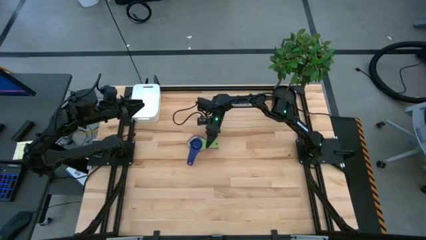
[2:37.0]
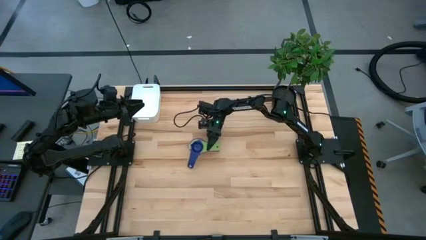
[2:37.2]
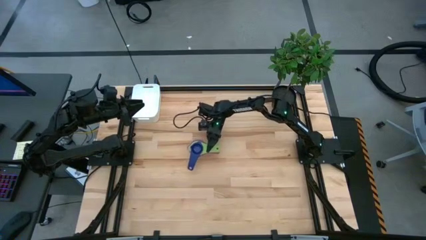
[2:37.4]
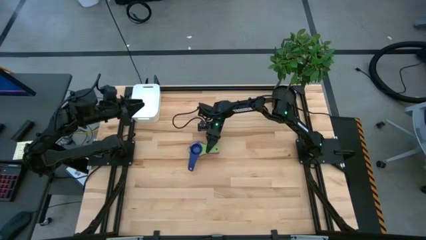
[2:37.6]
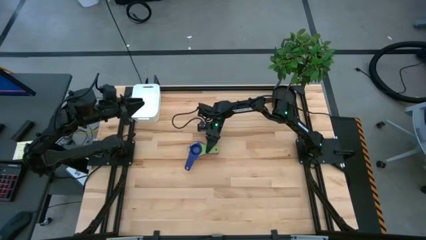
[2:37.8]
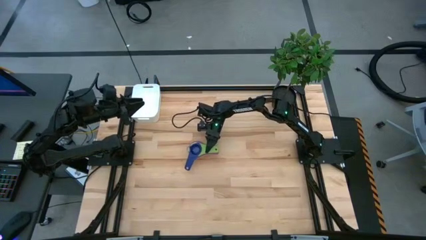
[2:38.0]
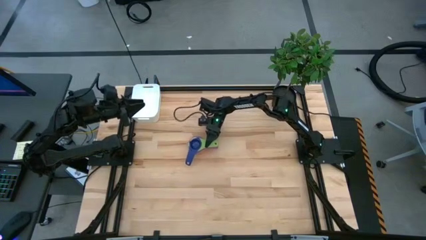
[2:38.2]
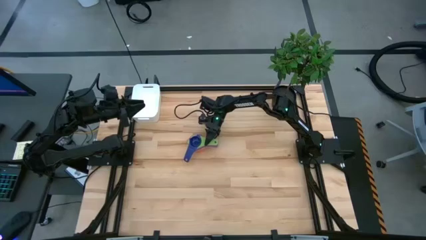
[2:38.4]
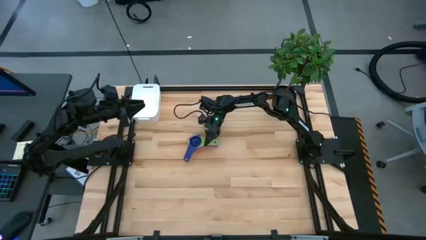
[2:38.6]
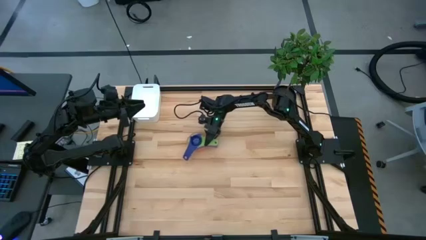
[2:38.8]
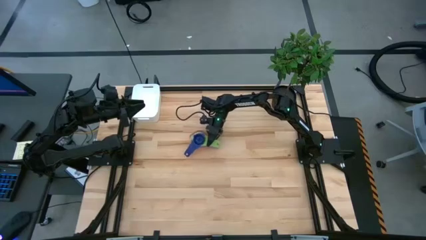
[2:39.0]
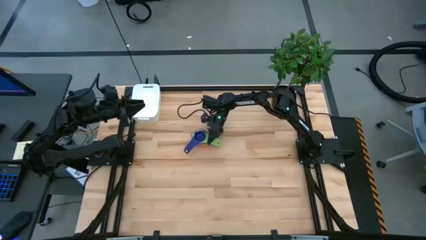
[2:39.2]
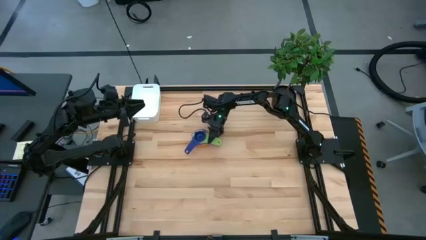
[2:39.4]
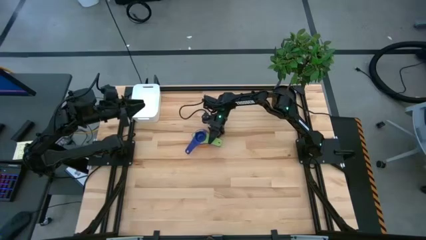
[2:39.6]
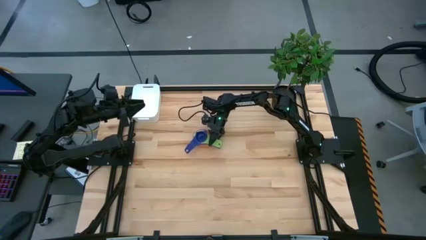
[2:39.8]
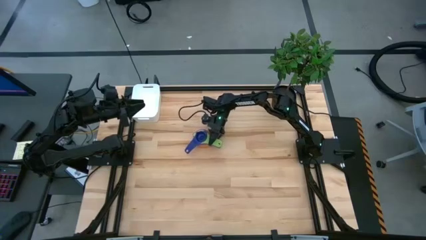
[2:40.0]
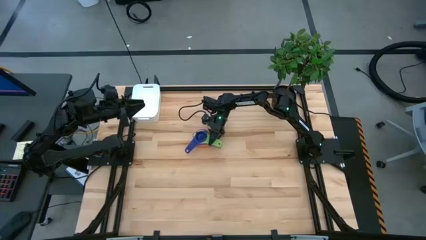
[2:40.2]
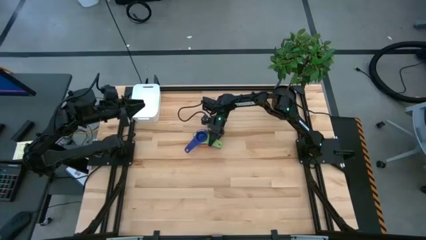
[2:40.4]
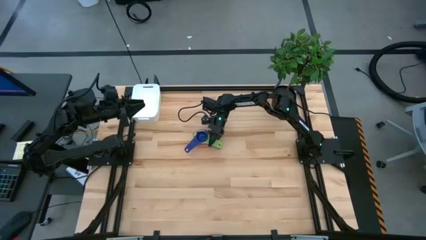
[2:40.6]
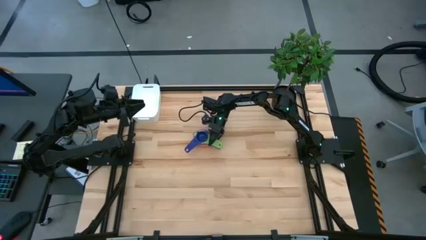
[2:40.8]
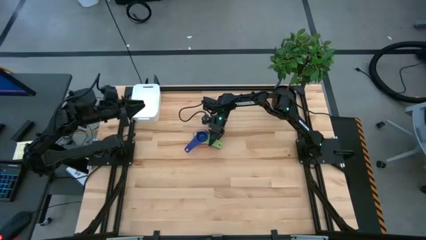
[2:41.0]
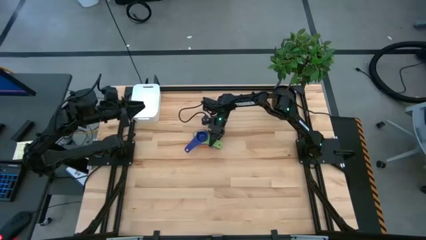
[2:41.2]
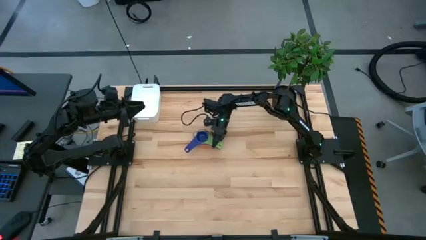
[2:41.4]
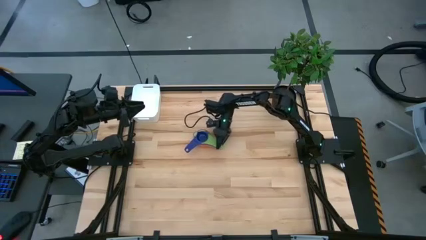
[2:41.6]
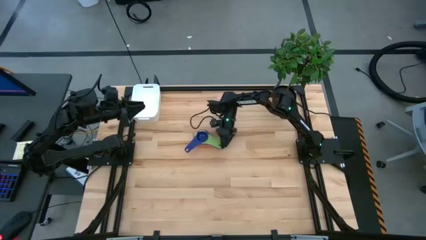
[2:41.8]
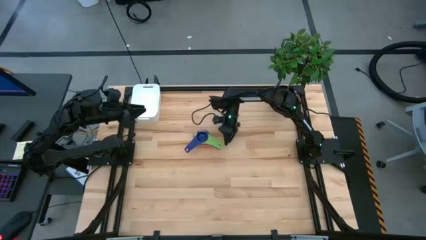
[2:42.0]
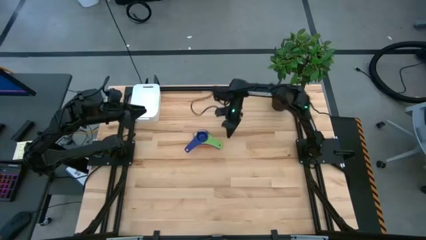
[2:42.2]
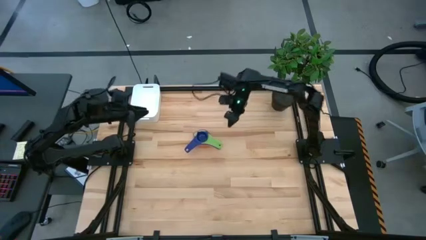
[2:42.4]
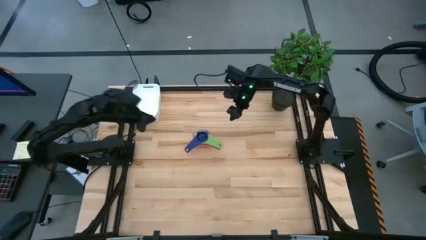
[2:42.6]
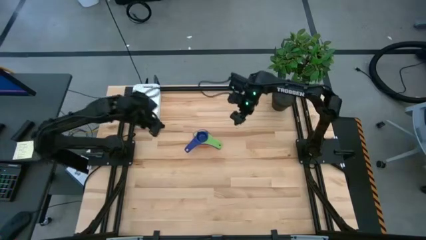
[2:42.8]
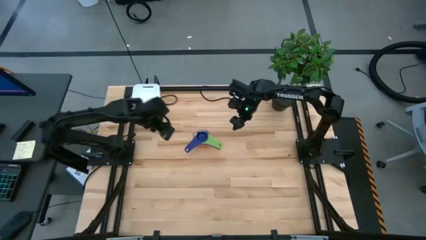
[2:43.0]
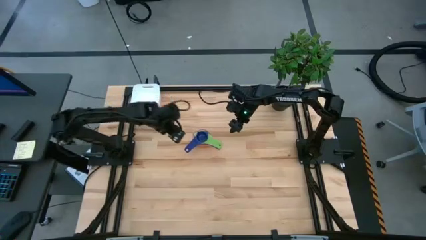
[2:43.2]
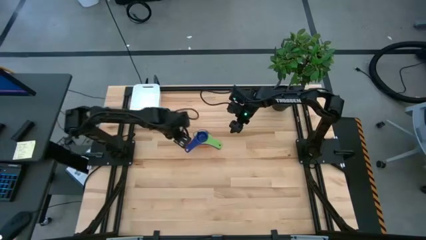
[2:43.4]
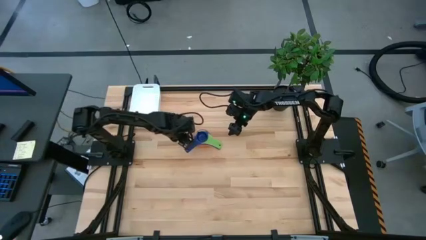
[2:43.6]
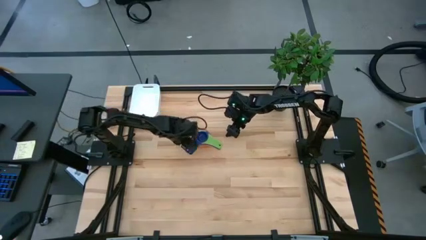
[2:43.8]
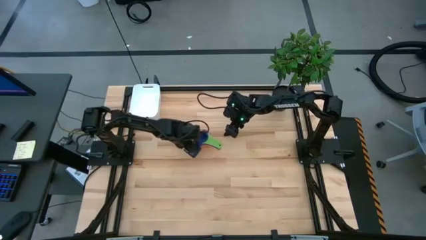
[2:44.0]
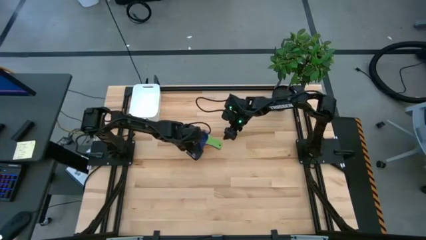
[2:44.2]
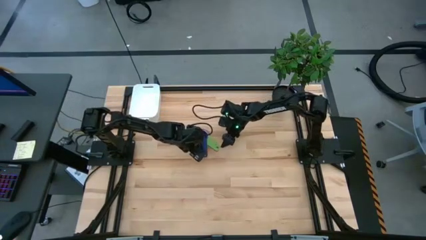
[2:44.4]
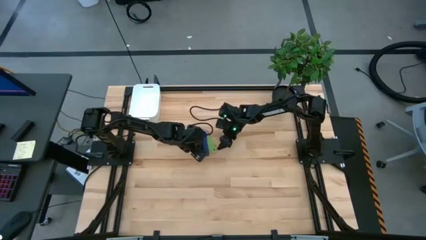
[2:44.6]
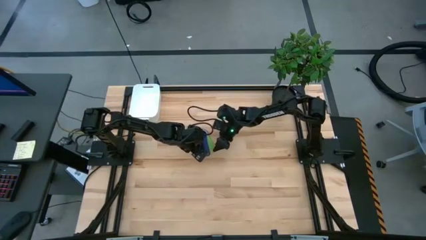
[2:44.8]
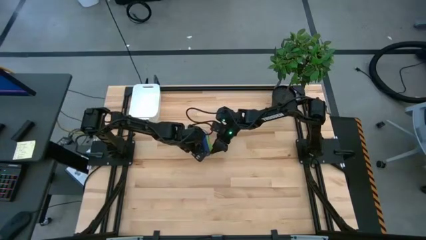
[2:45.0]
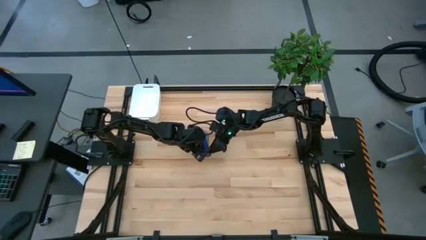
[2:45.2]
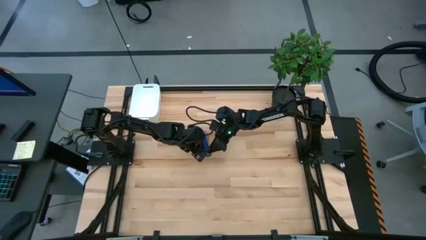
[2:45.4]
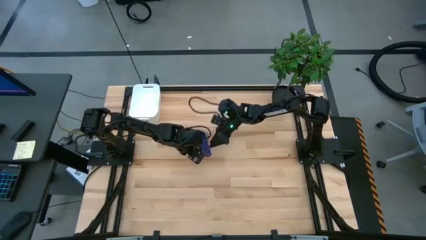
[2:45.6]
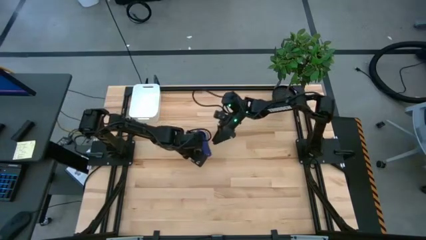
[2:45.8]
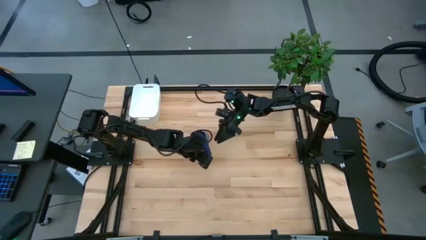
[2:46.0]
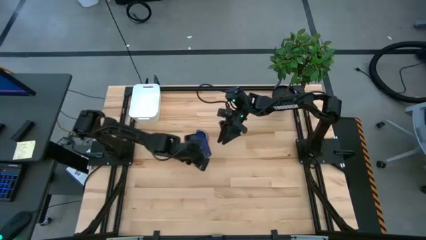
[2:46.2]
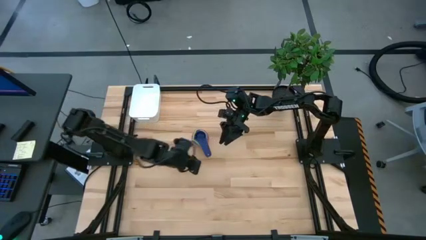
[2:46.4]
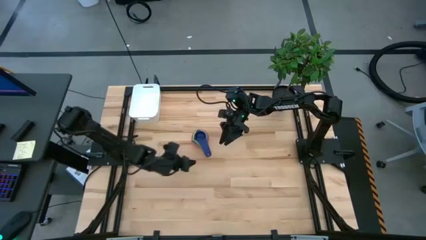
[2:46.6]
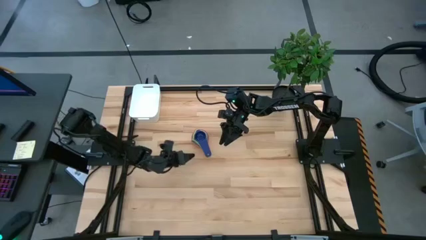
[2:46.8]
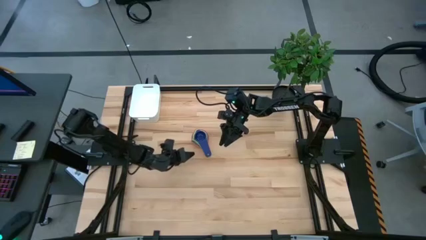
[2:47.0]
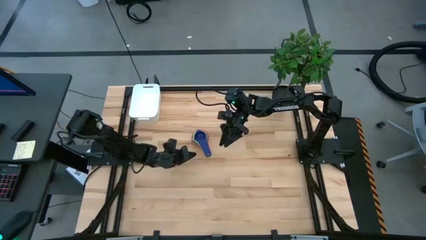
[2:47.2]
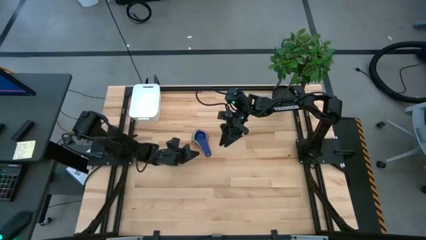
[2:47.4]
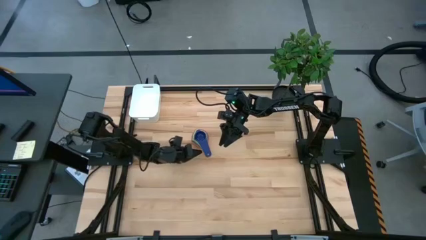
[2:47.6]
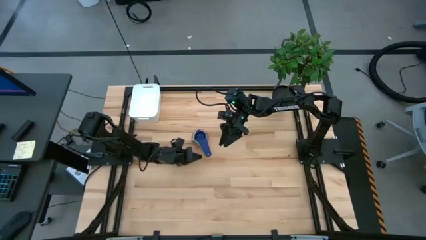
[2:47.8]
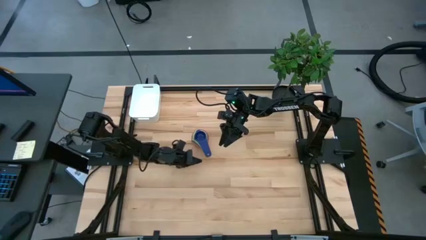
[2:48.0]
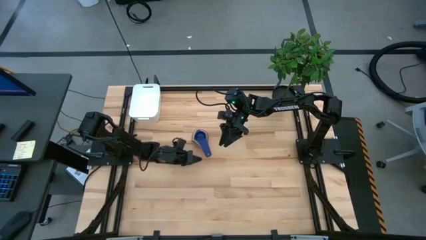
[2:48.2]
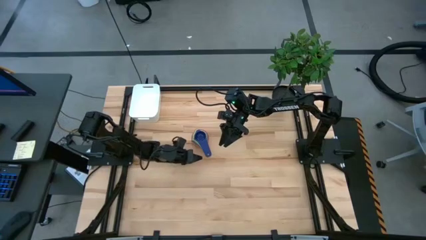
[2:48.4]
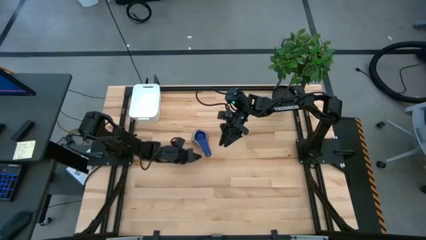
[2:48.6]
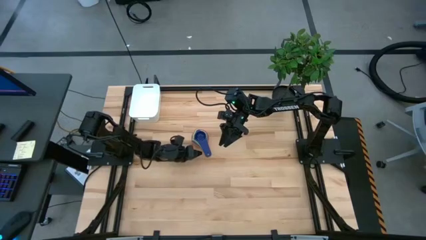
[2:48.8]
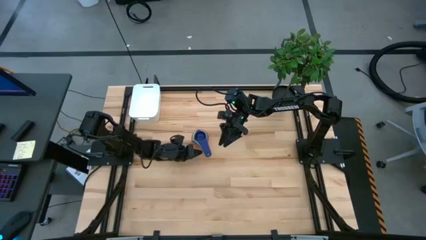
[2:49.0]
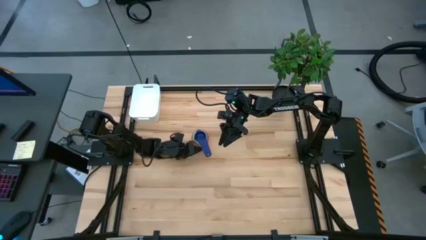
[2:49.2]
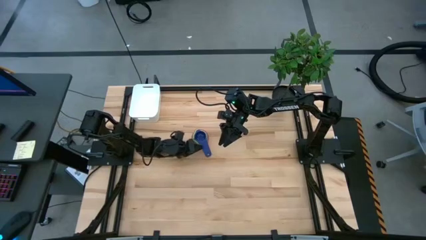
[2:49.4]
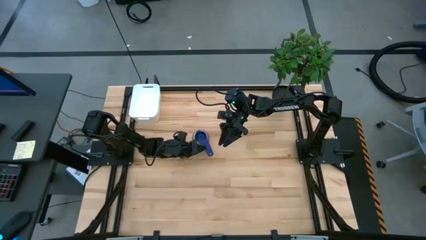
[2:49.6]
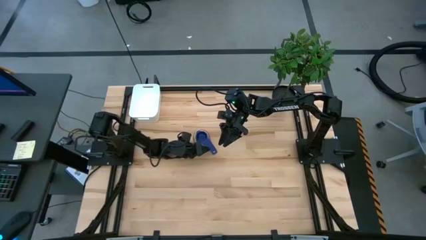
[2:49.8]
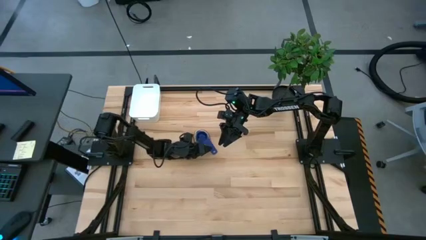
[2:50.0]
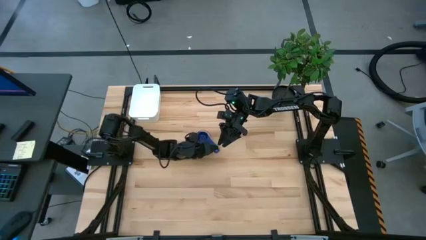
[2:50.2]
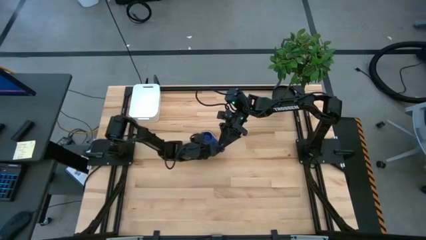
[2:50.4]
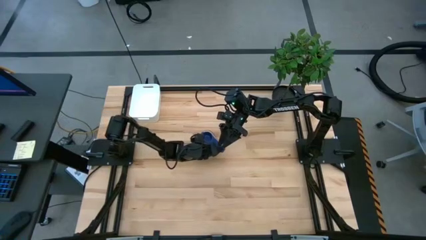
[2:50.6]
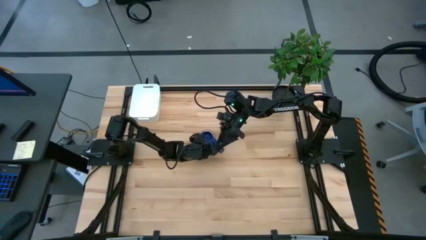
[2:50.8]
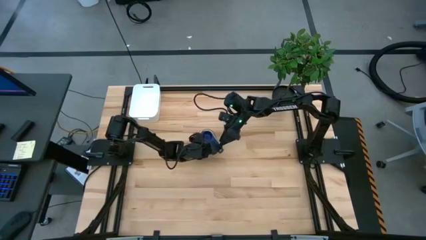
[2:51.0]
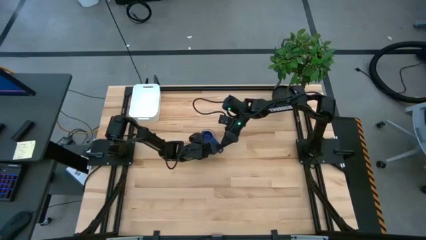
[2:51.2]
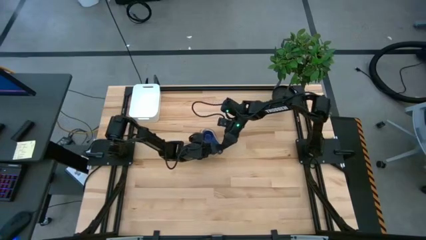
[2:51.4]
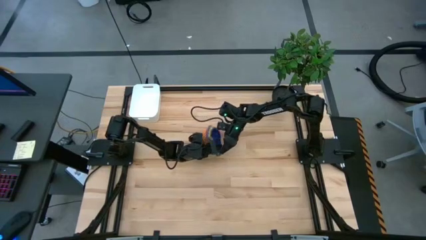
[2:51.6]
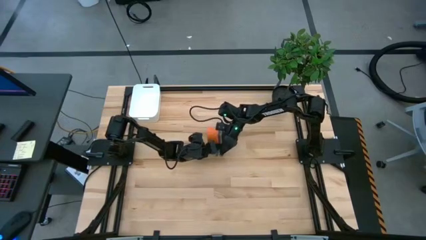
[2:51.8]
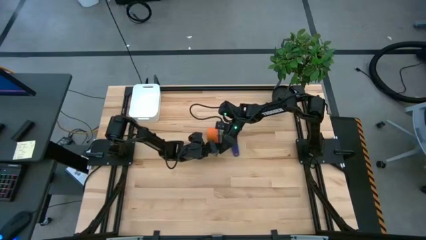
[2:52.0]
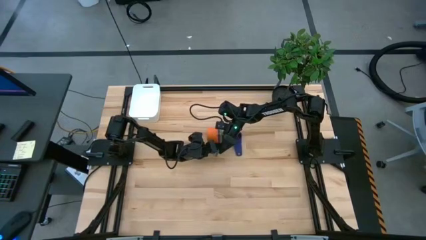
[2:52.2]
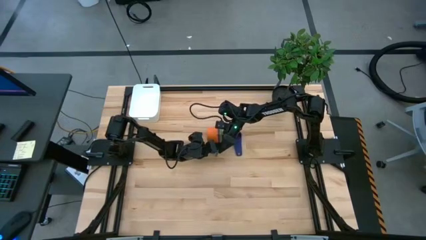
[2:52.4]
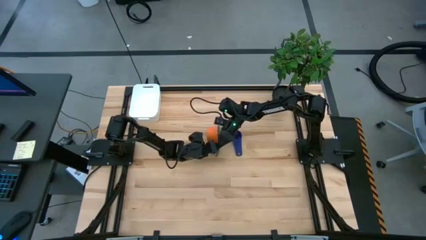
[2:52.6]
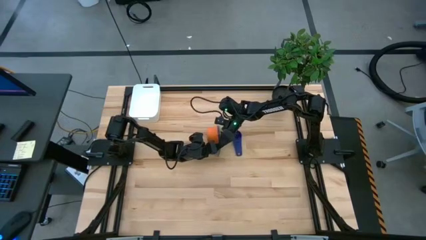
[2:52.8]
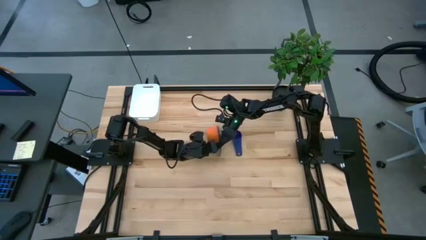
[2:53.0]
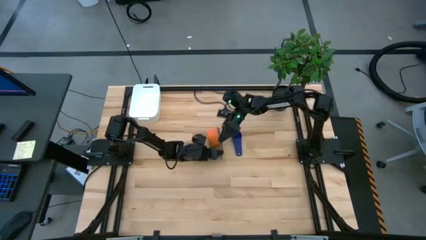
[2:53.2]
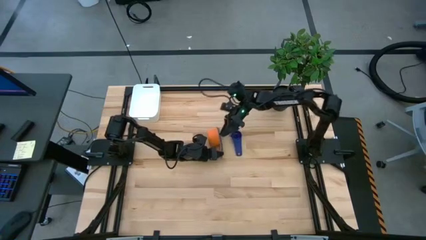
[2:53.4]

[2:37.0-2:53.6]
Task: Nest measuring cups in basket
Put the stacked of measuring cups into the white bin
